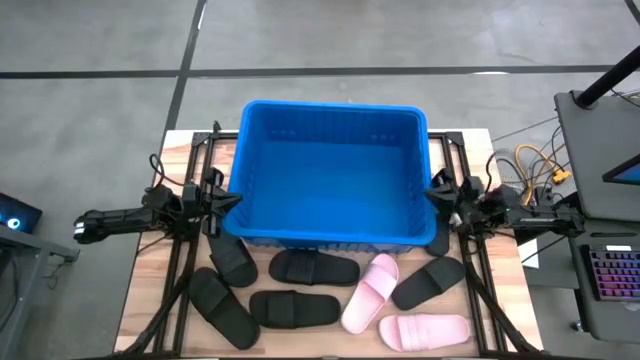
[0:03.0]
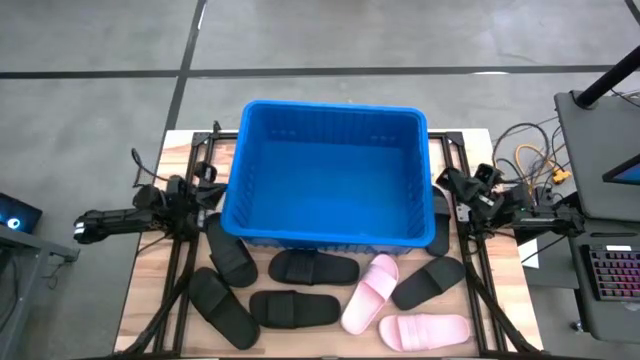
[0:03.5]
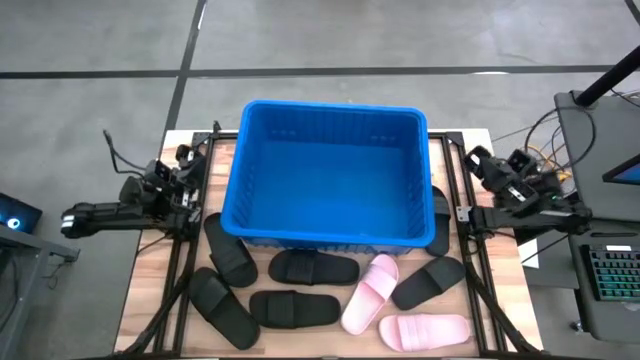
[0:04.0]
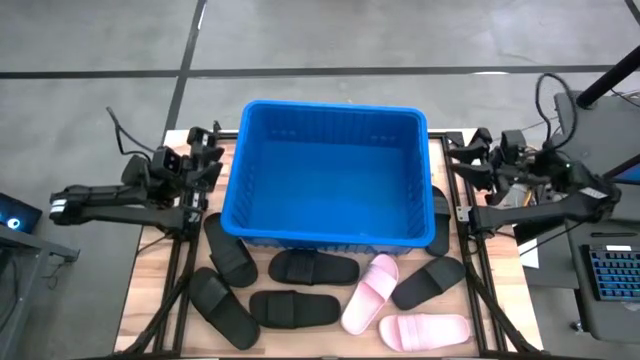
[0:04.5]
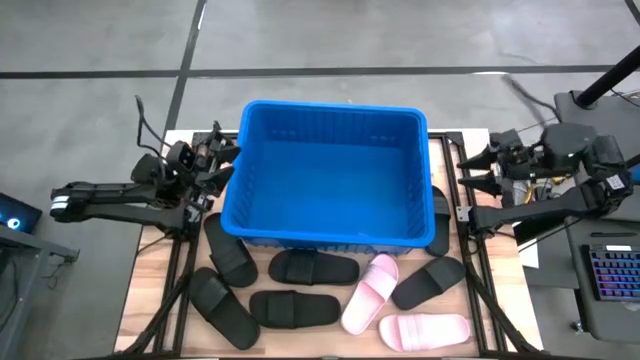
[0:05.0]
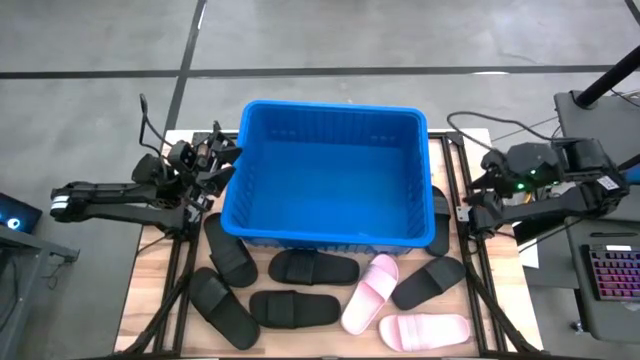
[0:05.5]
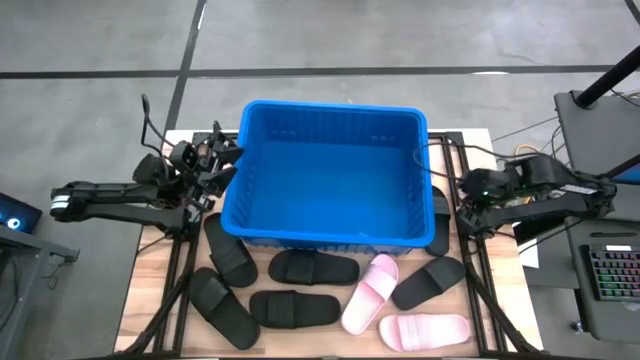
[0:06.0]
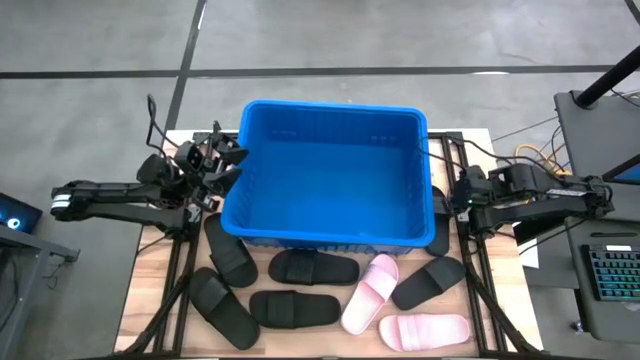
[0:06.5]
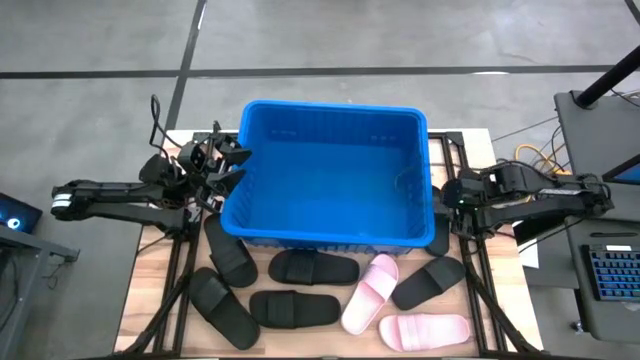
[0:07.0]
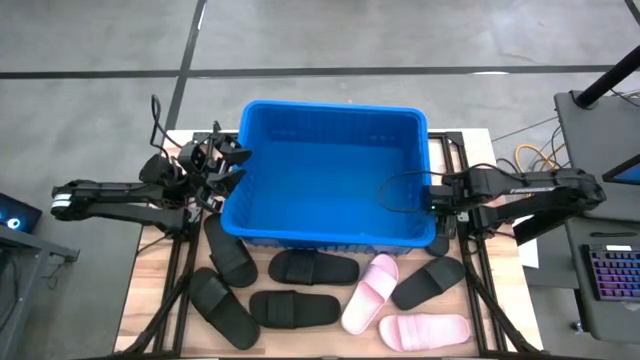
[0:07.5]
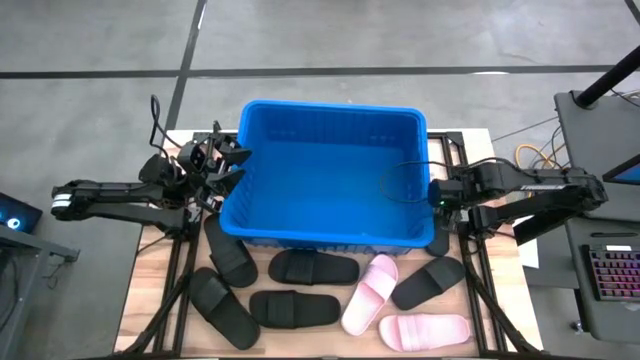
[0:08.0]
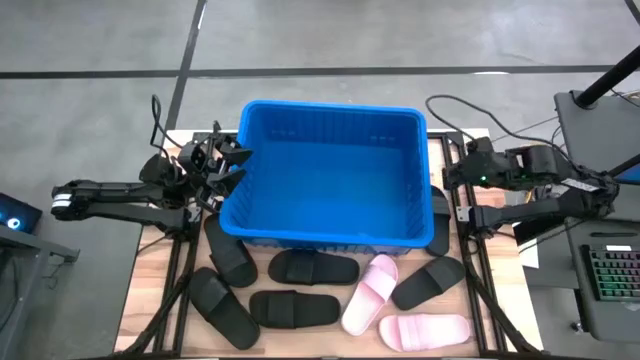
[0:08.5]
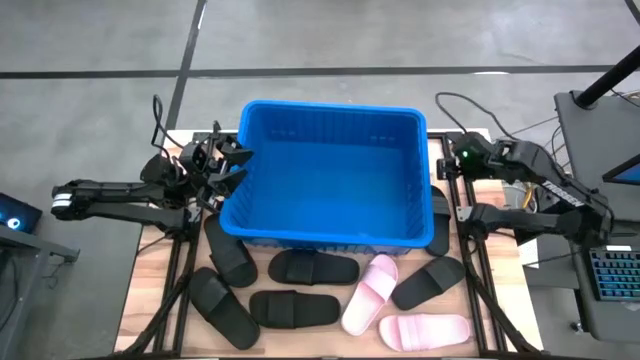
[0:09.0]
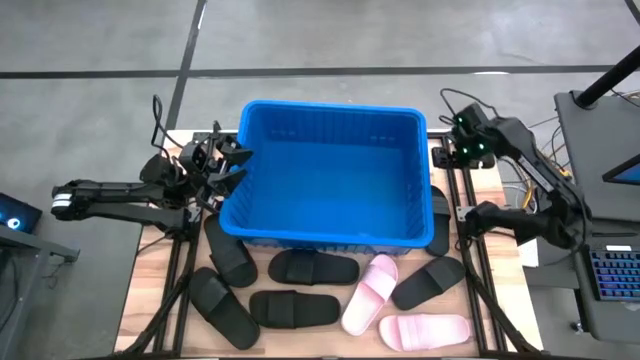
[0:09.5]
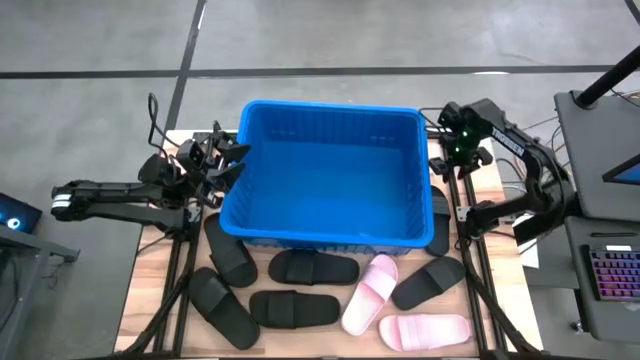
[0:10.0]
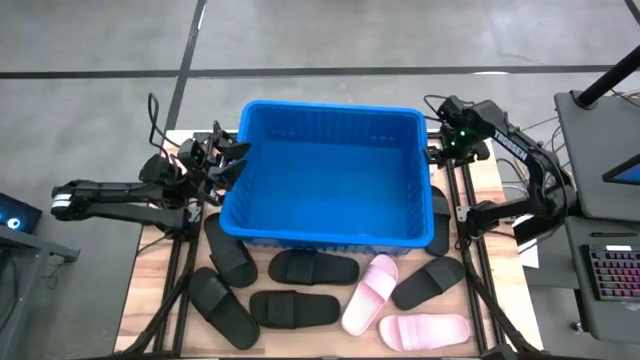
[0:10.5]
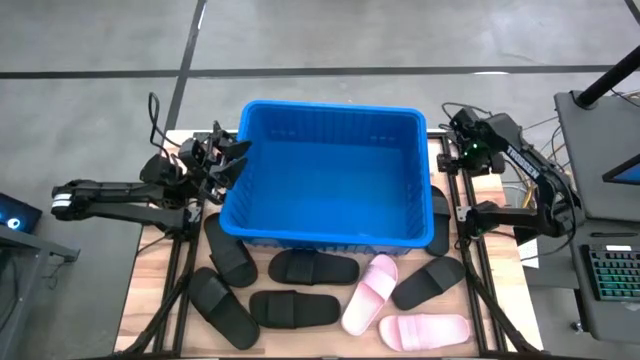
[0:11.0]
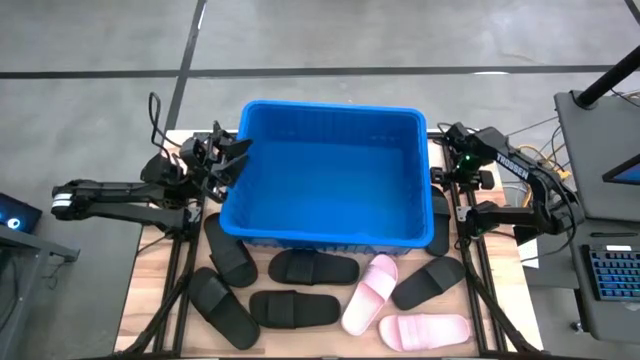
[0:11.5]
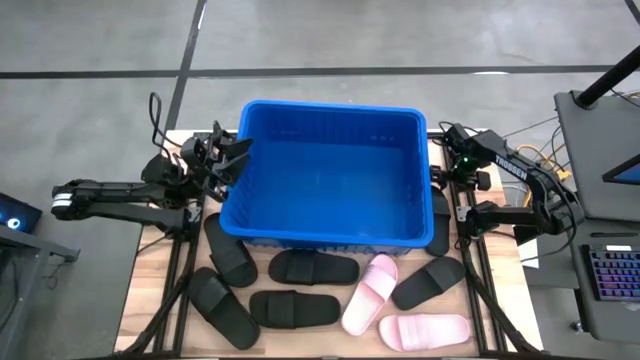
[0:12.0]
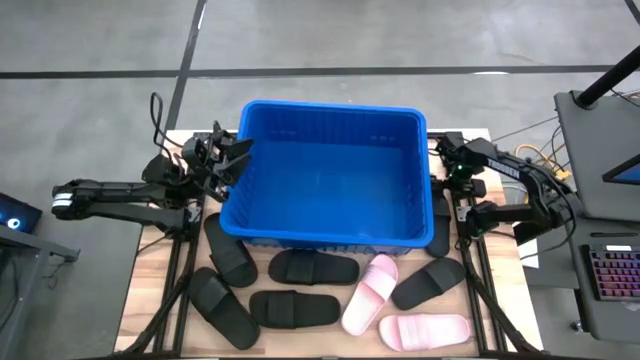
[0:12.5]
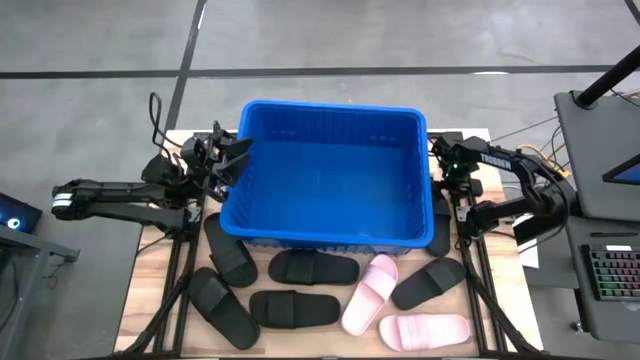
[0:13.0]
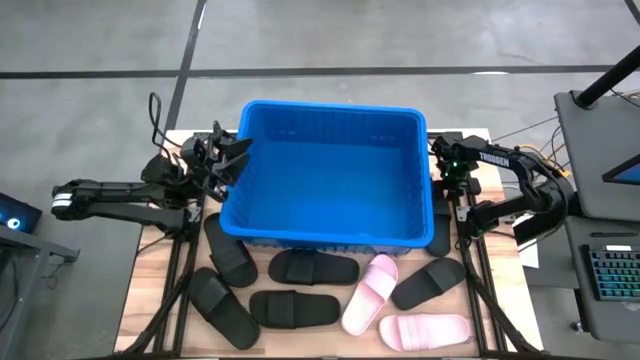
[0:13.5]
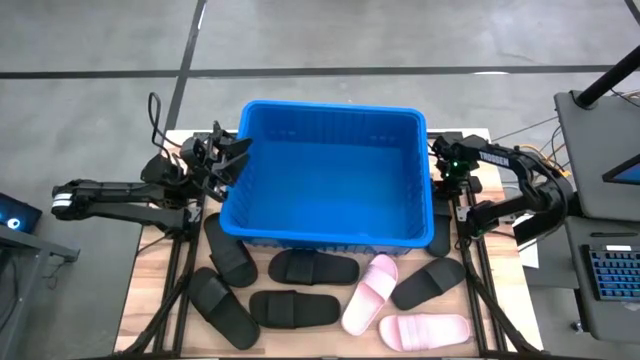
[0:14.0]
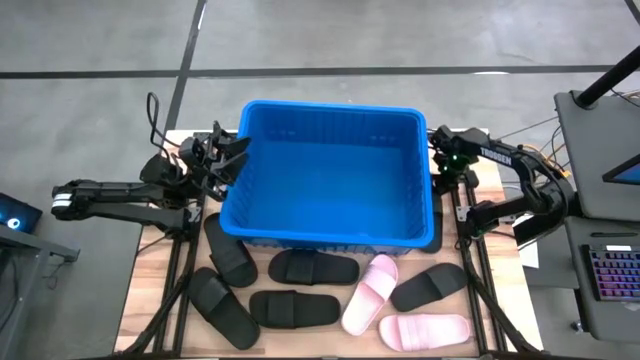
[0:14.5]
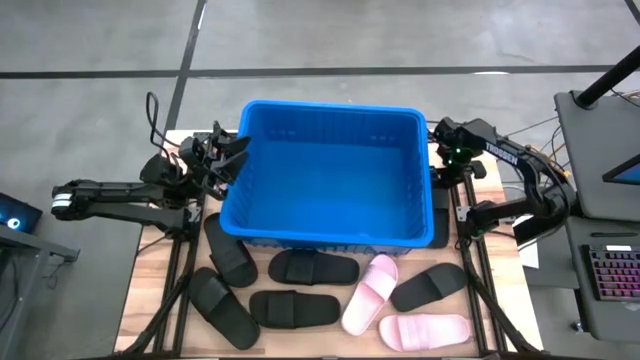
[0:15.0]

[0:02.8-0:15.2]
Task: Pick and place slides into bin
Put the black slide into the blue container

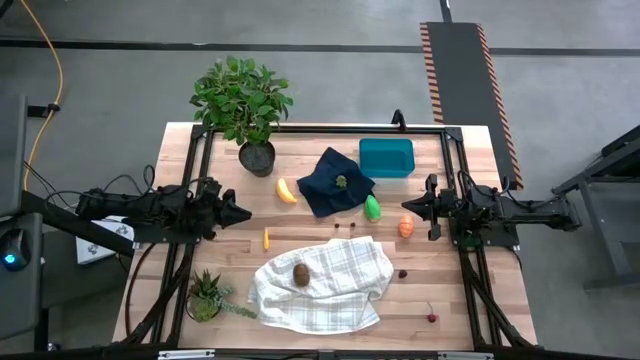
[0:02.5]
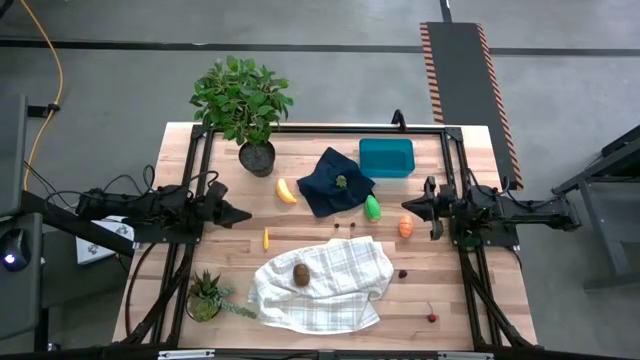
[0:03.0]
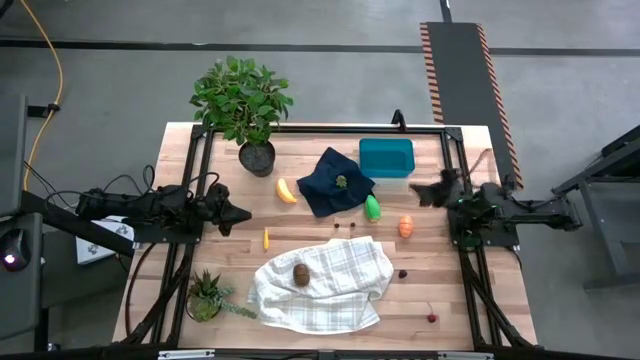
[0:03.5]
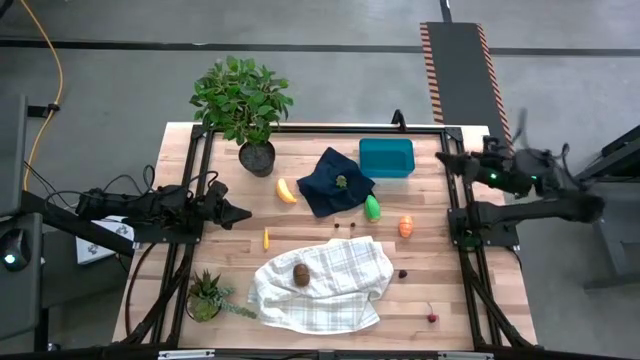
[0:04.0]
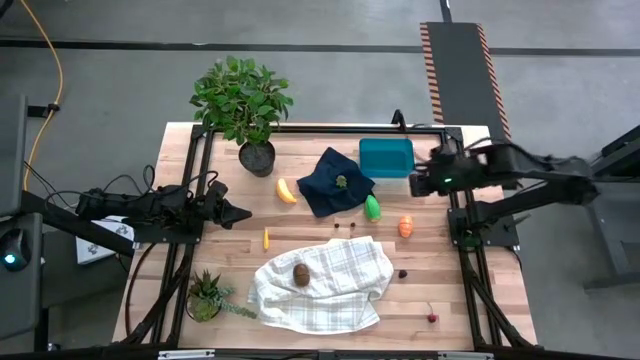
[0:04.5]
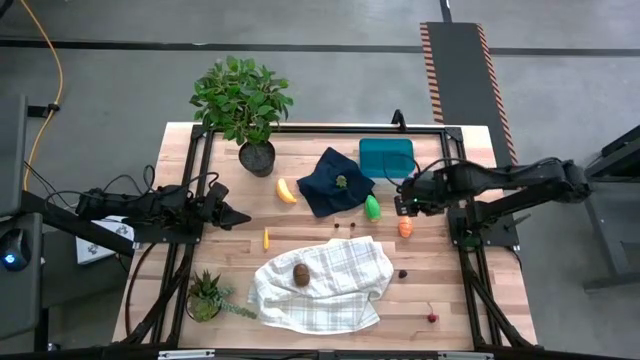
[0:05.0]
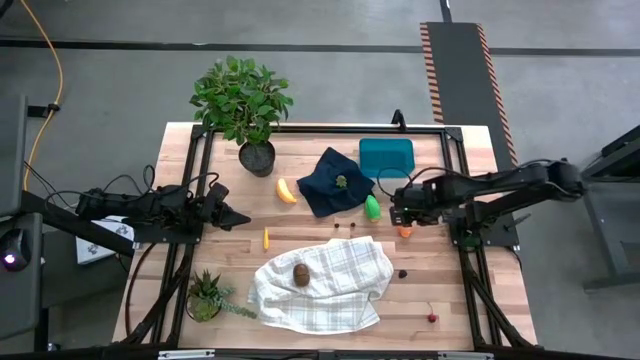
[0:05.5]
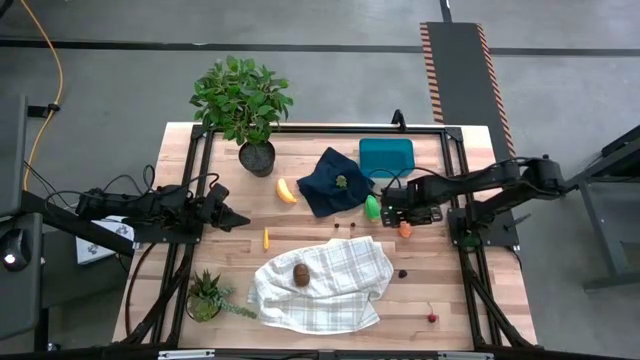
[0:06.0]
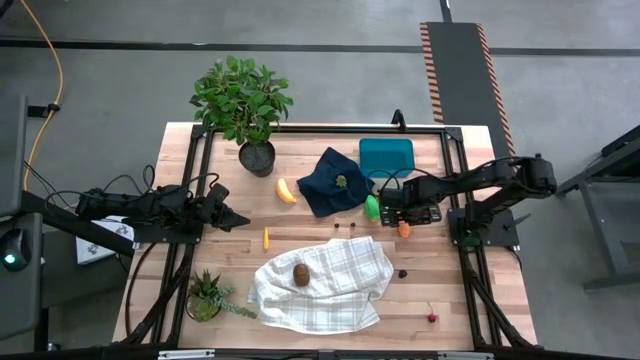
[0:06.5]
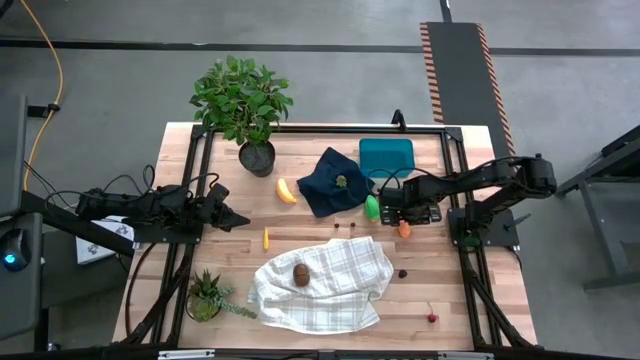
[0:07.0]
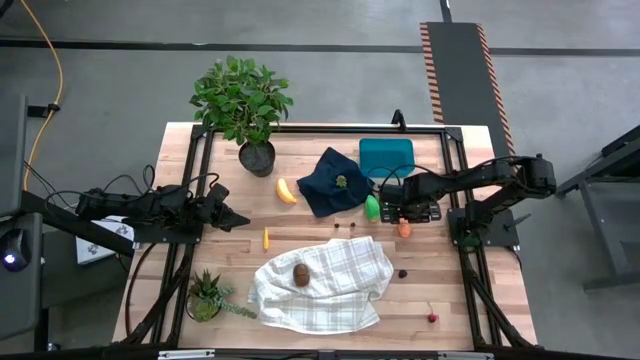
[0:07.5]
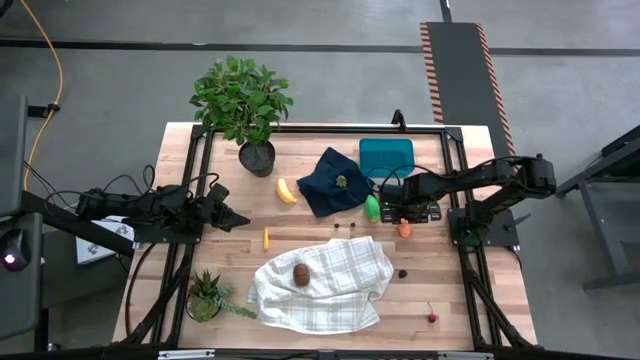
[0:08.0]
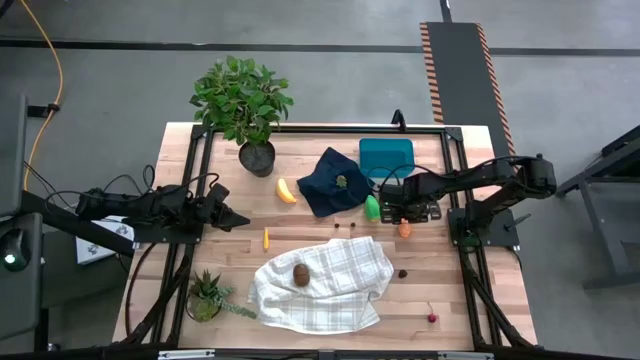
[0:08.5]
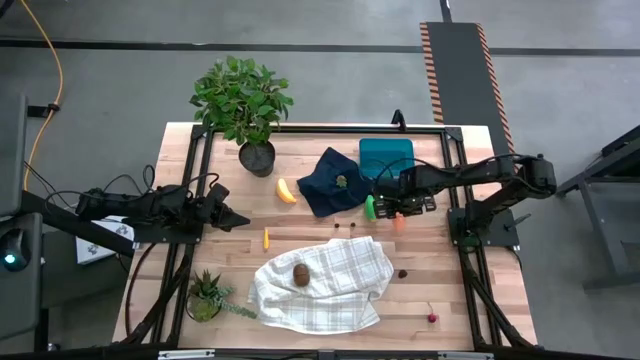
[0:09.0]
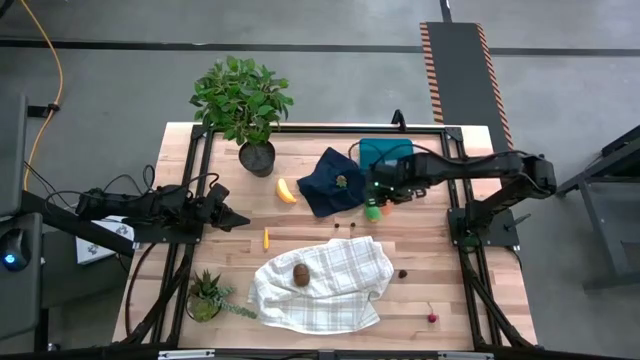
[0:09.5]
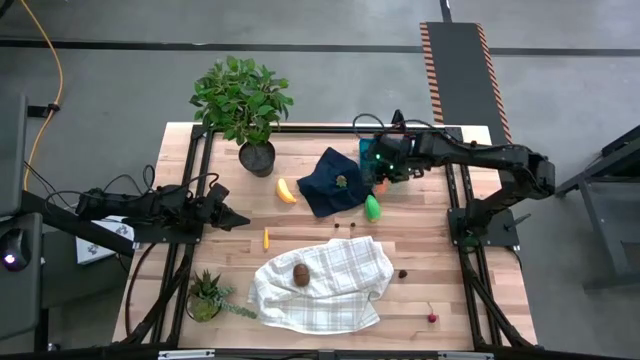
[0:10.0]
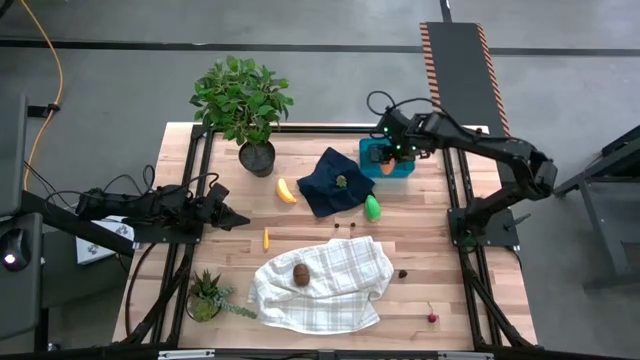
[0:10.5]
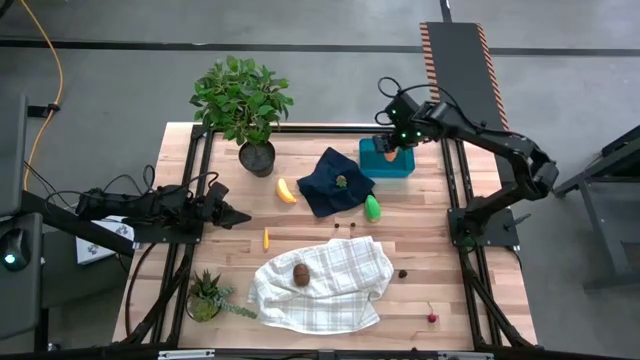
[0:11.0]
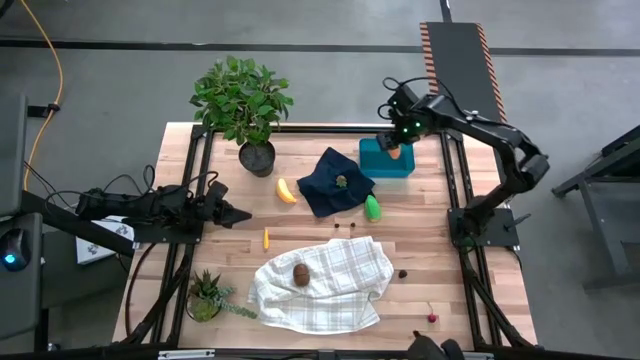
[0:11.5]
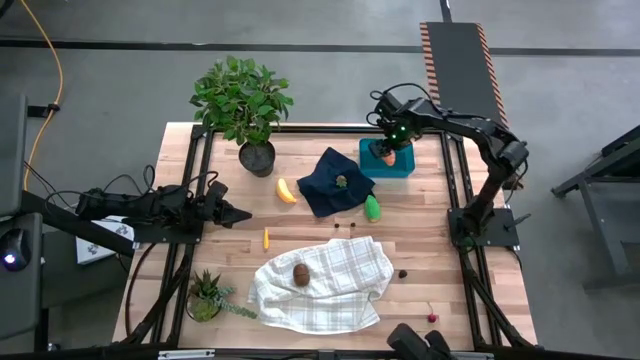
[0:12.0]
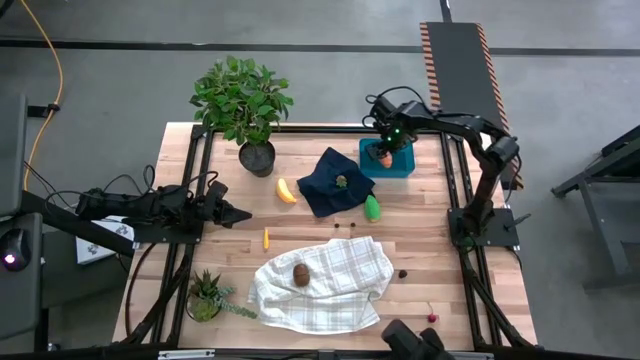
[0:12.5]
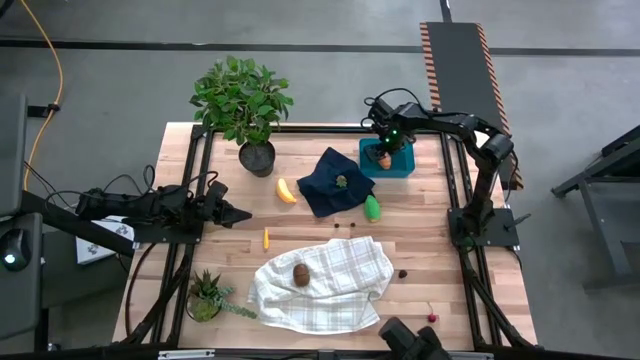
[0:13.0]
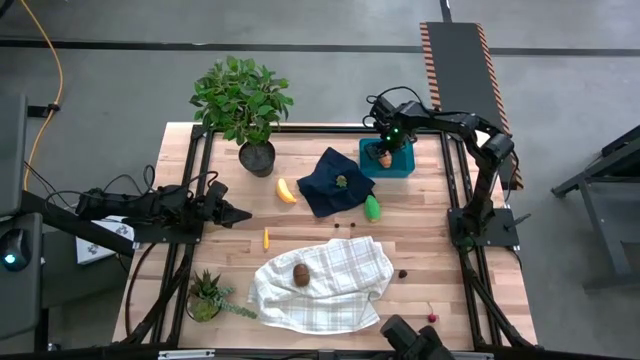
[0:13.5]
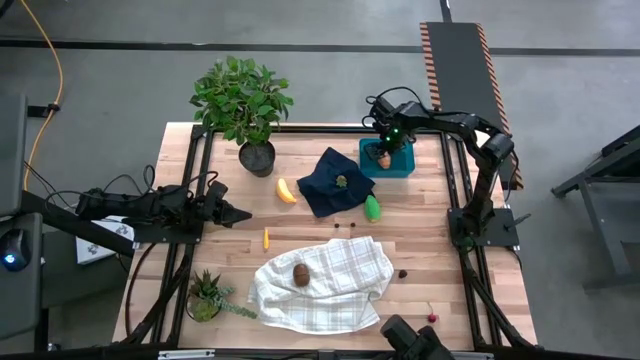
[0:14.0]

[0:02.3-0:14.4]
Task: Pick and placing Produce into tupperware
Put the yellow durian into the blue bin
